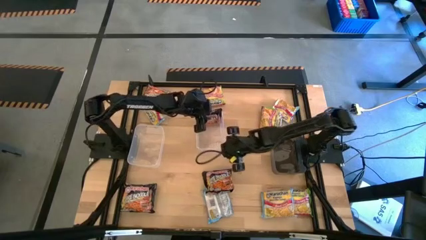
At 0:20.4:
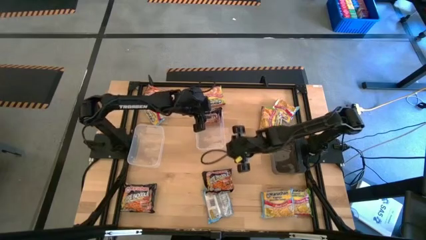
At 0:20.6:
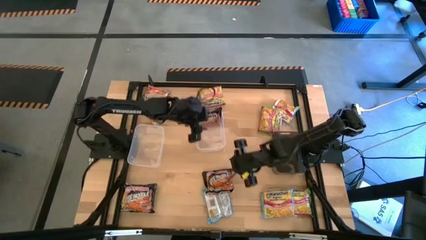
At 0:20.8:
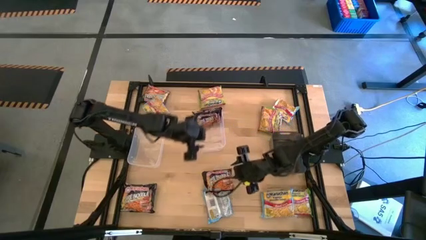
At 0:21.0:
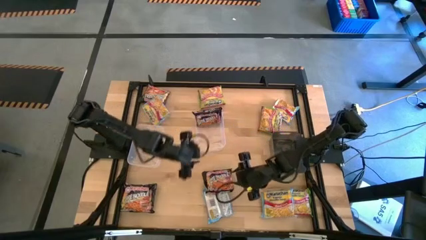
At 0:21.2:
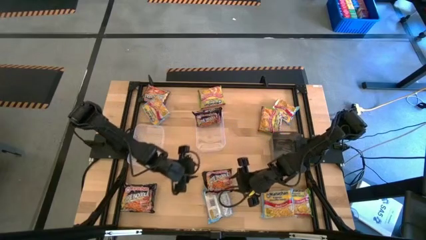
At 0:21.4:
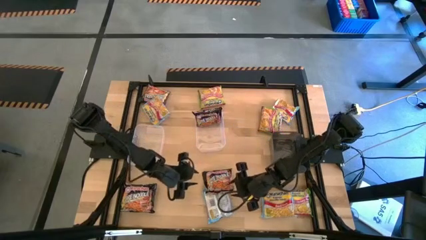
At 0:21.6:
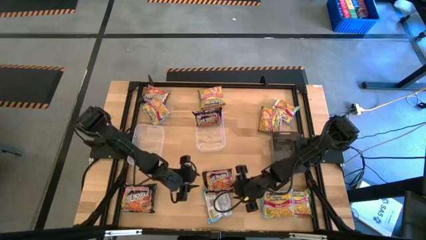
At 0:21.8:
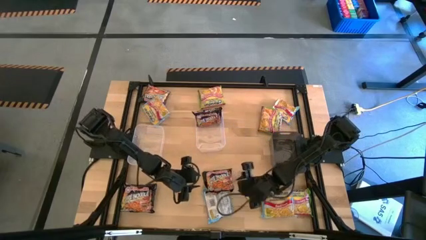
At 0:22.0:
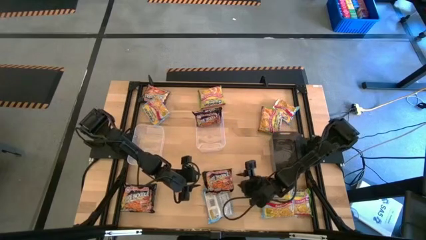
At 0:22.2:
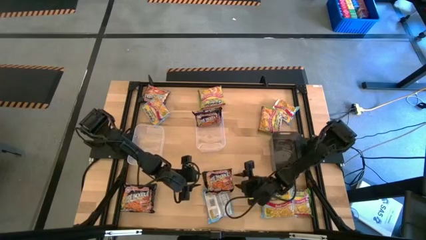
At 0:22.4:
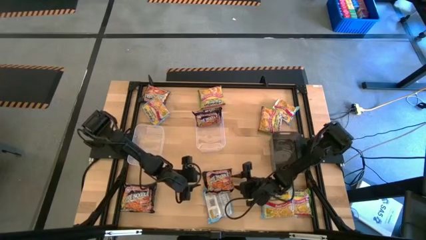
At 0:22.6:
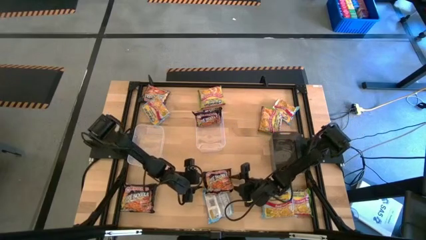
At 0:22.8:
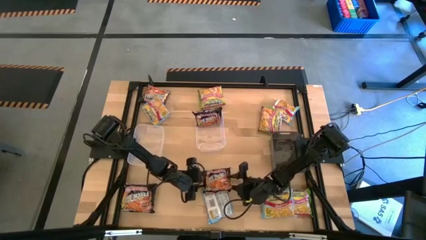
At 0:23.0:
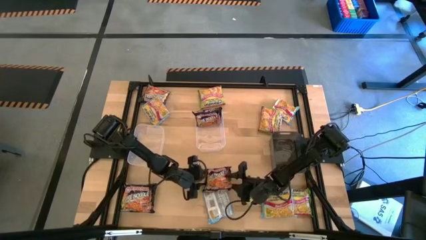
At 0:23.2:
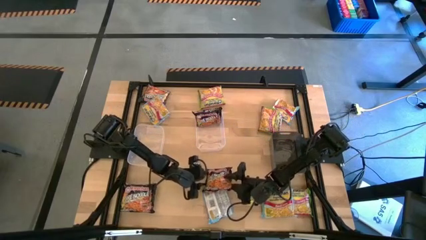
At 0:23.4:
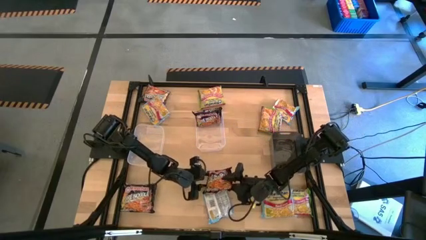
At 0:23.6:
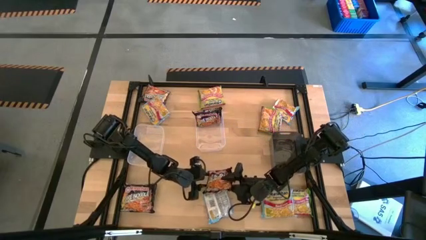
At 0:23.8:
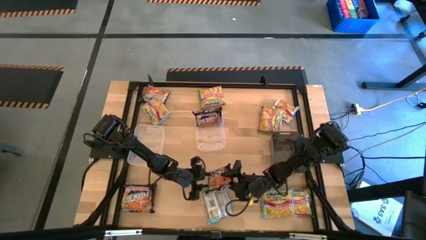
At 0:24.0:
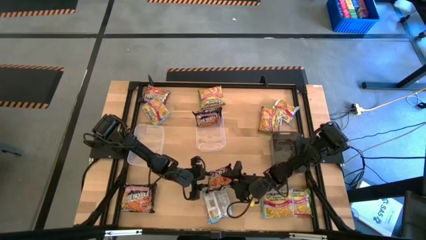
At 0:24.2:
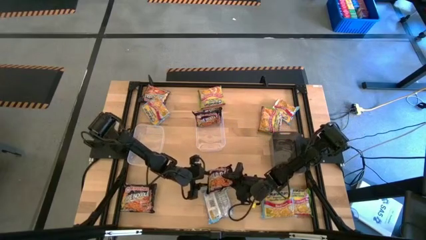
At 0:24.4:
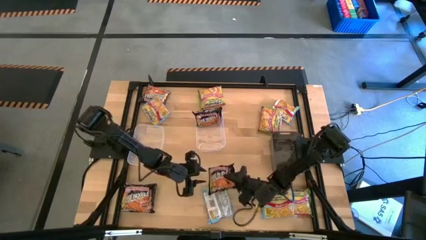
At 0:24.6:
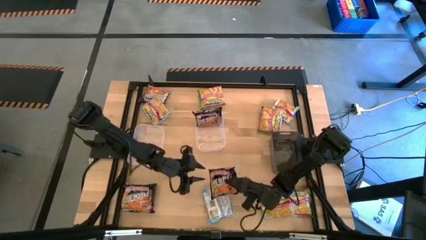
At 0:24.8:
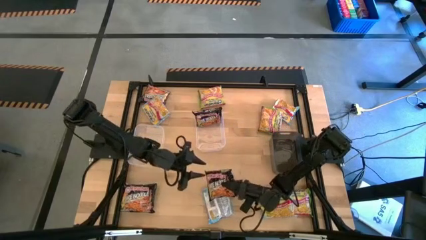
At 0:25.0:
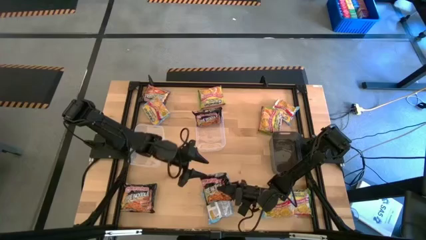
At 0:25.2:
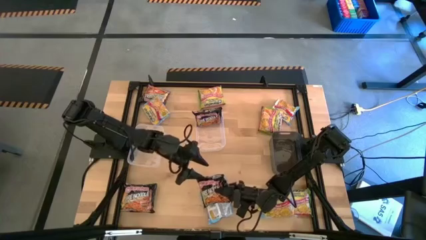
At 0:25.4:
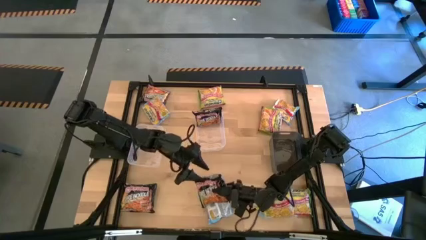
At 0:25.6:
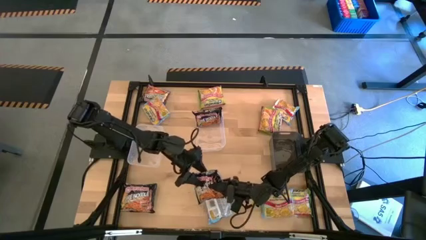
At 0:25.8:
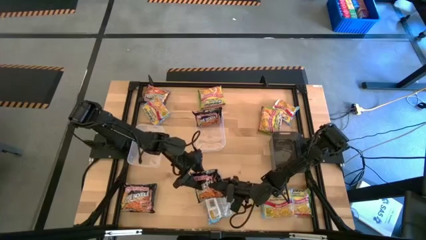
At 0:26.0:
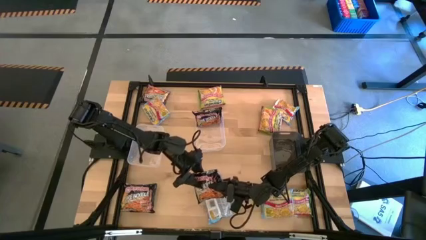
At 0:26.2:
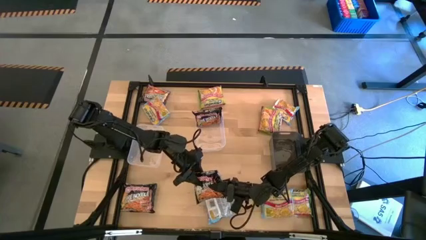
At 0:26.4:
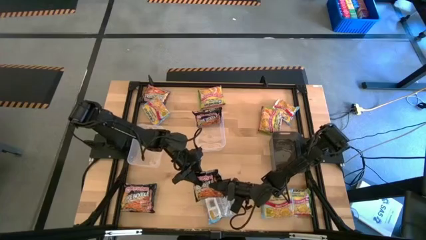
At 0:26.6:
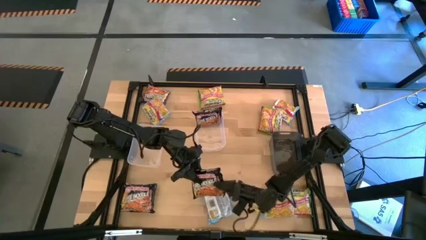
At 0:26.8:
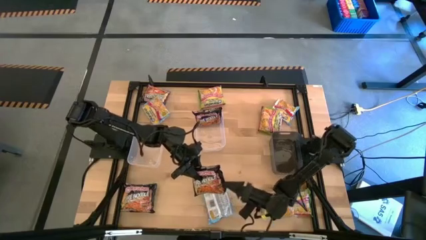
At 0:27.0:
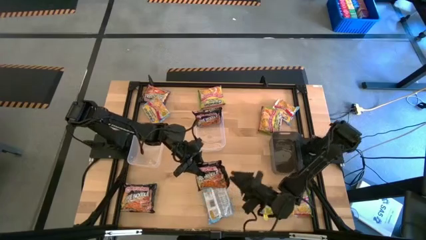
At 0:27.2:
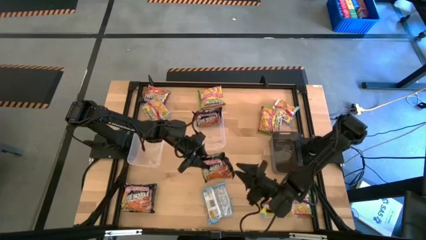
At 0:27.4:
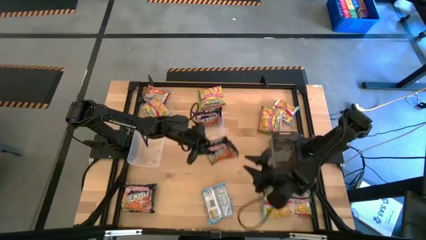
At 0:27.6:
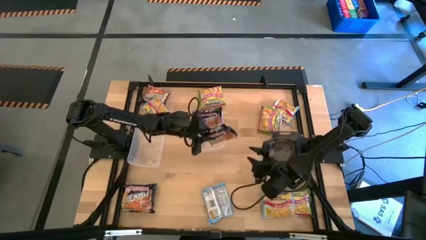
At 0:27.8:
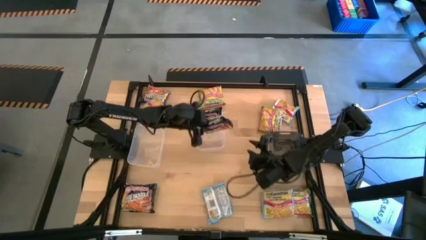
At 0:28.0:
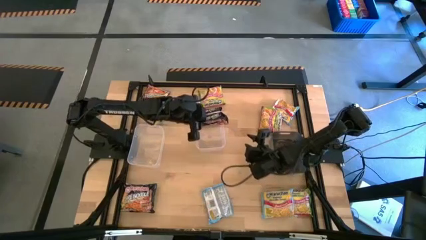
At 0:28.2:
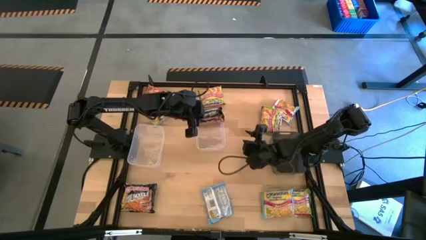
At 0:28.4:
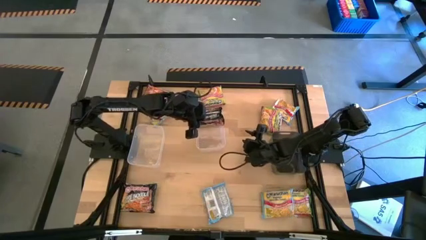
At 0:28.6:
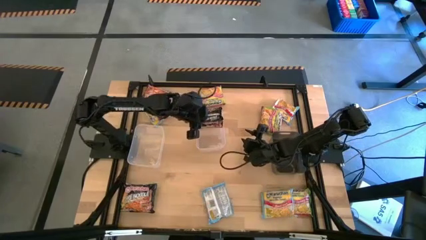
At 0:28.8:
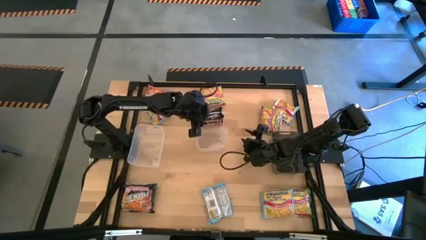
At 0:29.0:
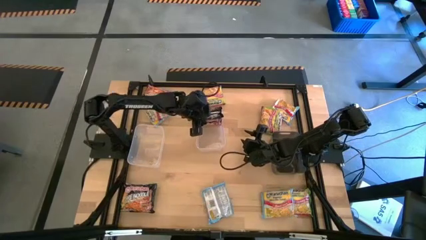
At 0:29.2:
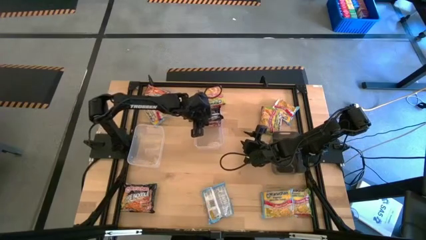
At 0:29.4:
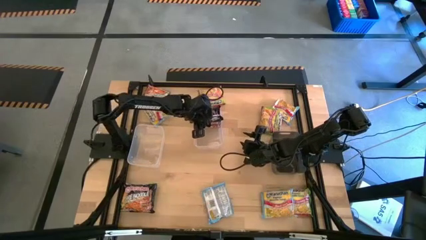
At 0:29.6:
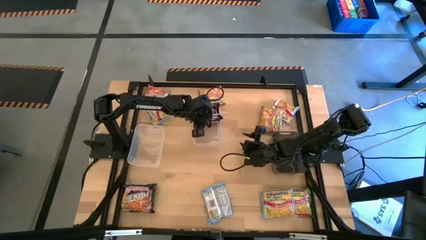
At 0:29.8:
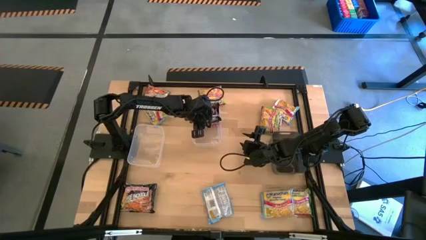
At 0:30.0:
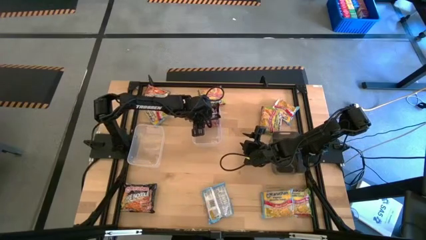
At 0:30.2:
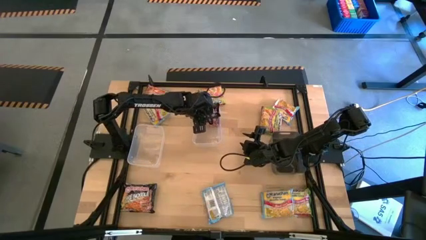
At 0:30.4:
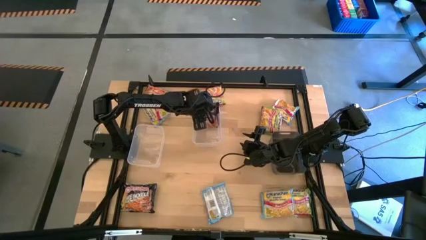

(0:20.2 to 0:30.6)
Task: Sort Maruchan noodles
Put the black noodle pack into the right transparent bin
